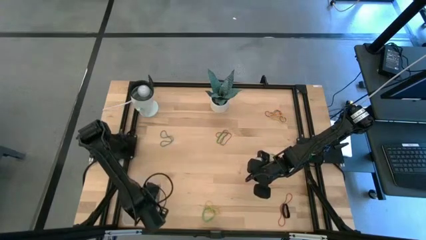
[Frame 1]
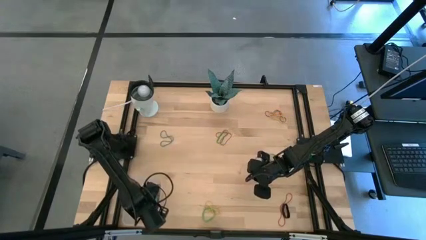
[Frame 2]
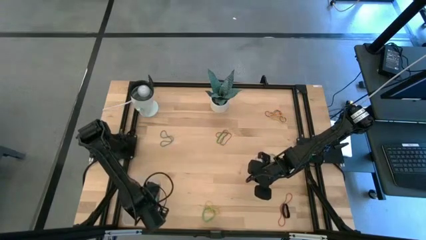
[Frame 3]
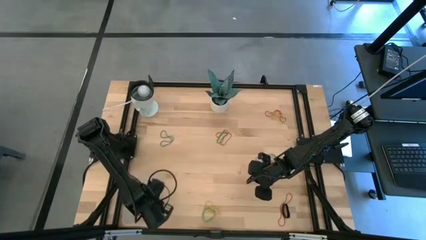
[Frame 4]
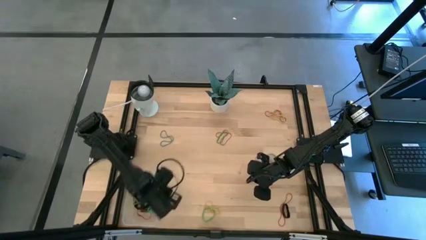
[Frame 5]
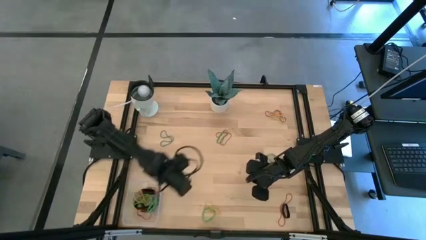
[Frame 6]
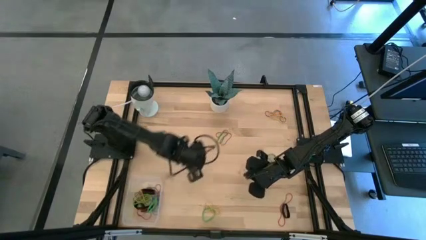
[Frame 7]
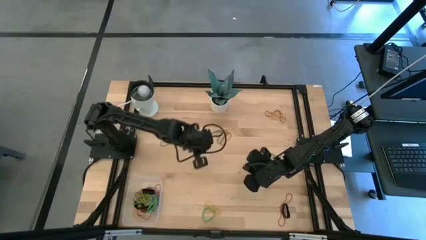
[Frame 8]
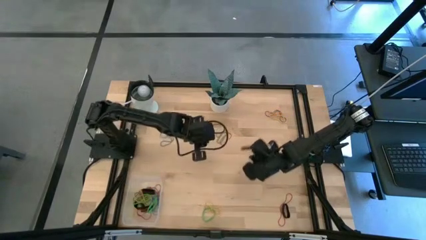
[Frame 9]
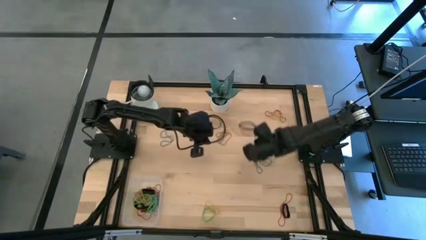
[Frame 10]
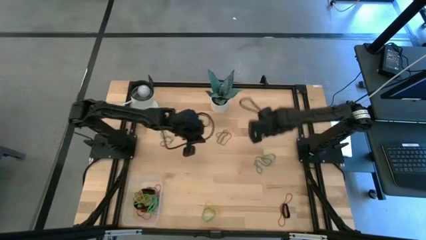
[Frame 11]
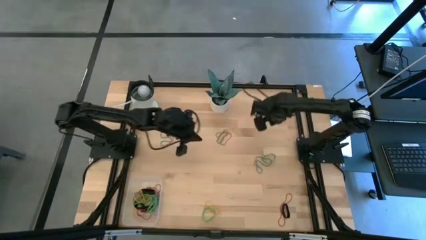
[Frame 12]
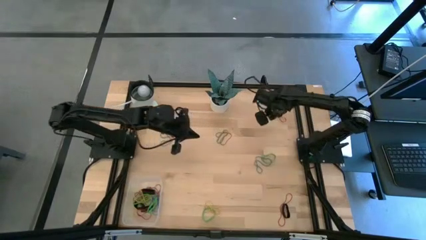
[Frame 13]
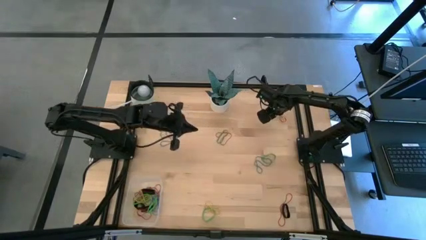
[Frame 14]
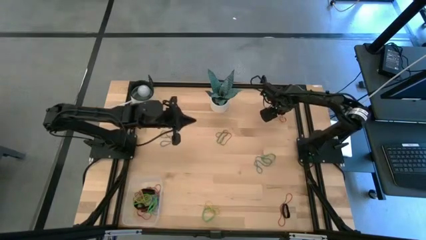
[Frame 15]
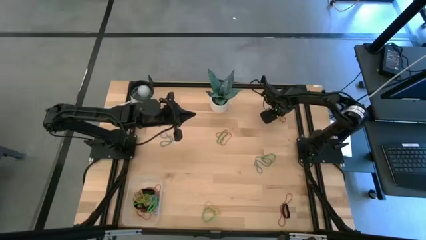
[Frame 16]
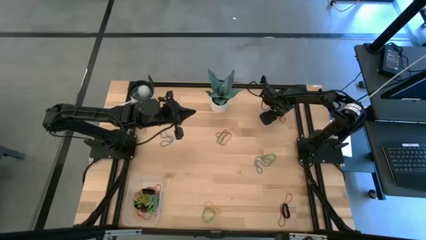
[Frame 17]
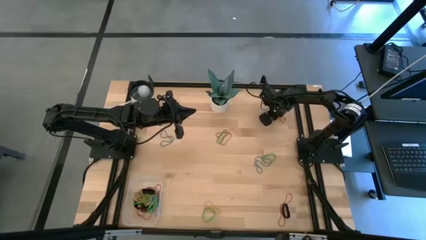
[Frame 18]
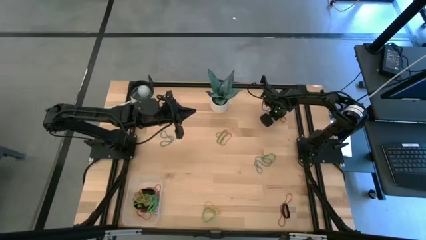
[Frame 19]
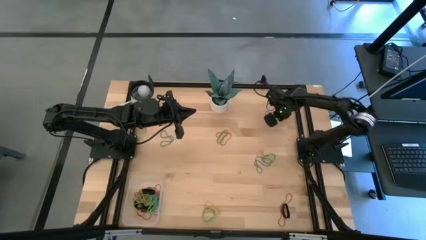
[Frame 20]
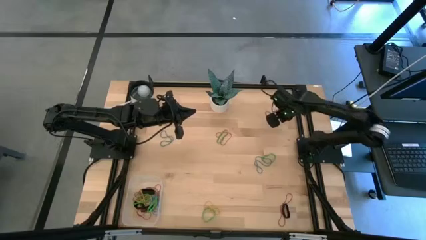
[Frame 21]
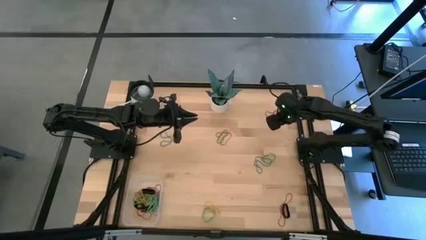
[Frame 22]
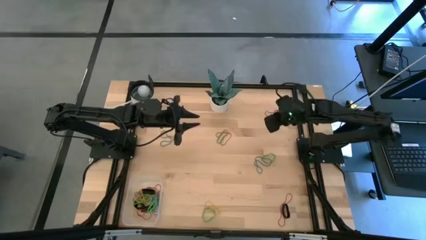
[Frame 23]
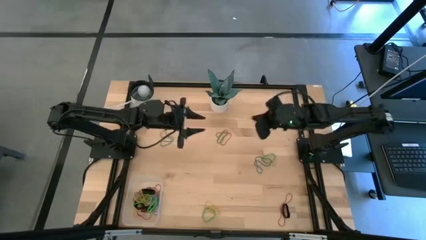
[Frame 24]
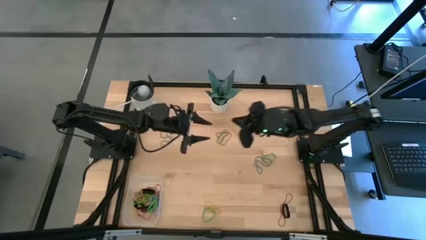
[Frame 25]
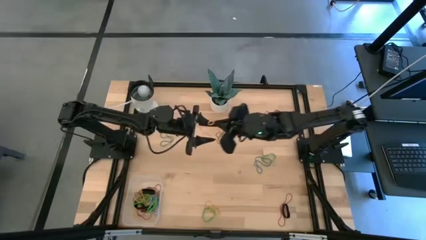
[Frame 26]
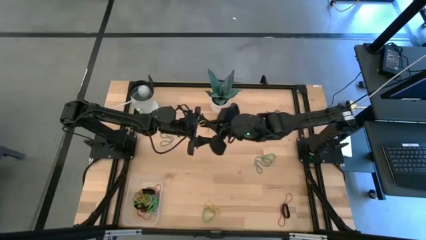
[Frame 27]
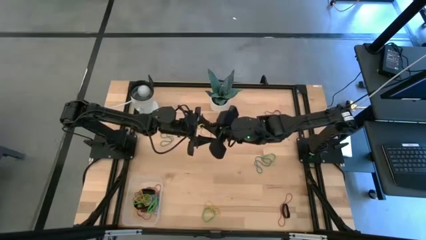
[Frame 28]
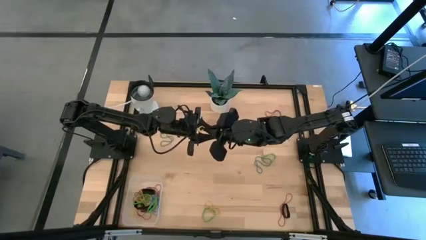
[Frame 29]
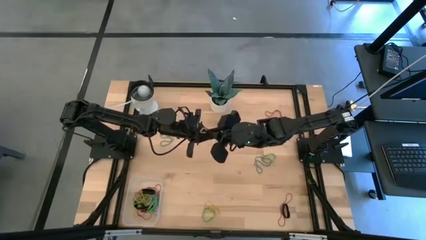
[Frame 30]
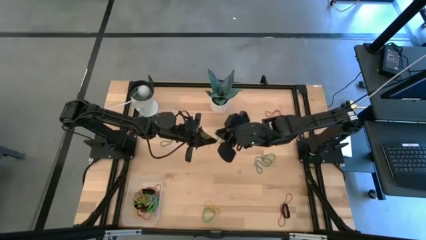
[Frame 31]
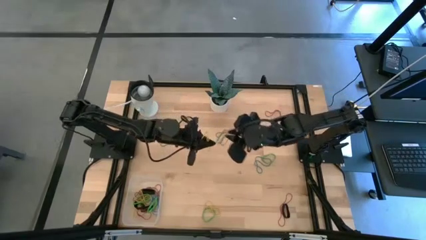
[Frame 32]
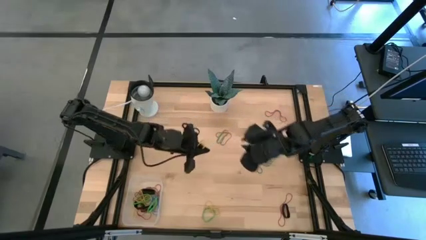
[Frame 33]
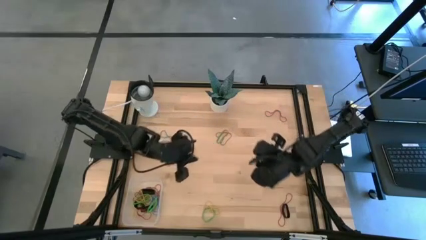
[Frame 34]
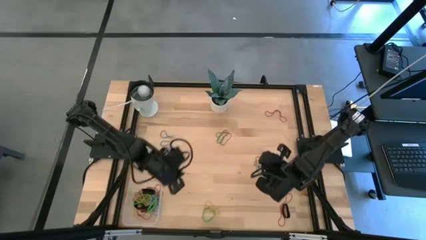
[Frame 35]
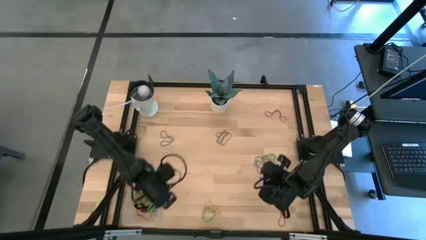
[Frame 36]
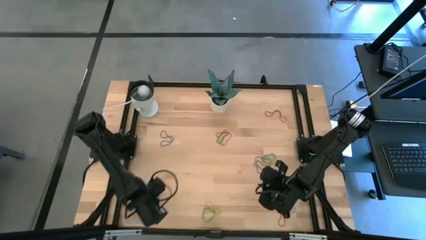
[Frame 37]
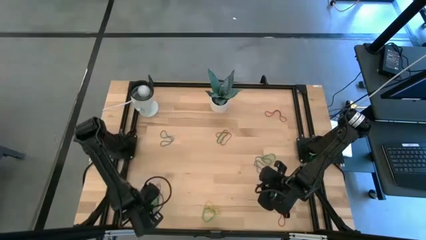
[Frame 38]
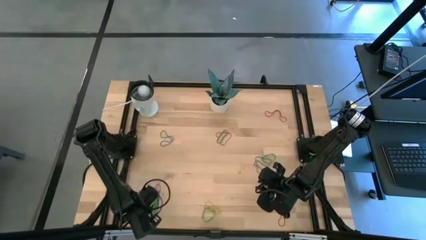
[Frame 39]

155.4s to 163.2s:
Task: Pick and place rubber bands into bin
Put the yellow rubber band into the transparent bin

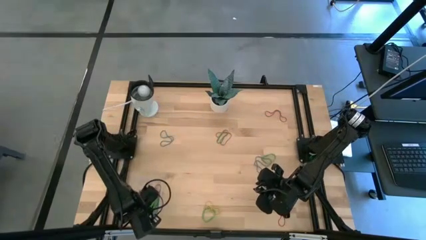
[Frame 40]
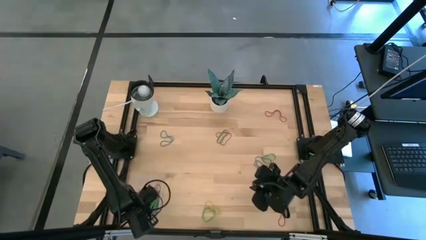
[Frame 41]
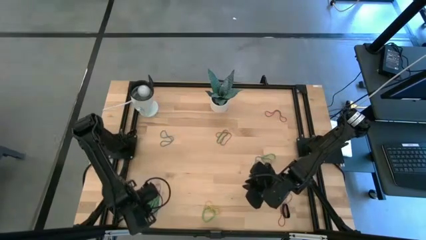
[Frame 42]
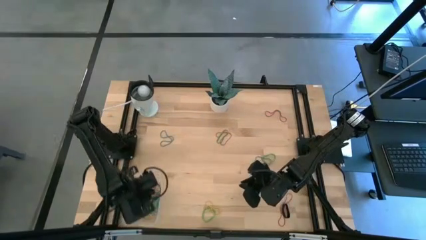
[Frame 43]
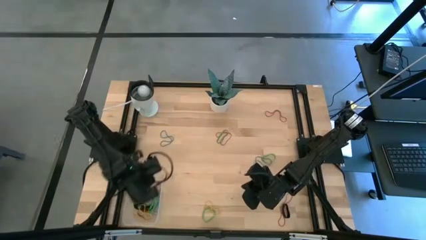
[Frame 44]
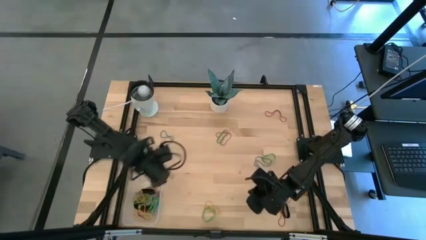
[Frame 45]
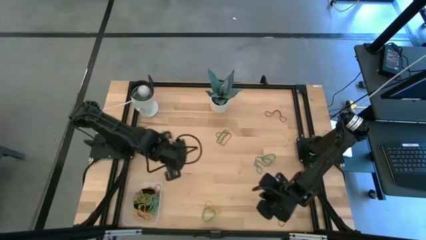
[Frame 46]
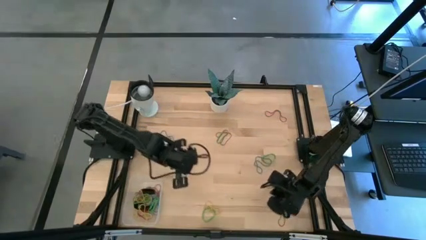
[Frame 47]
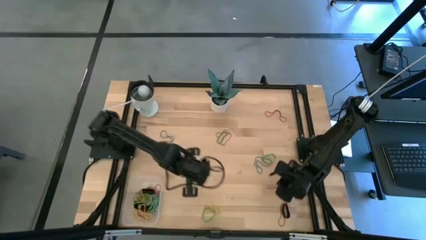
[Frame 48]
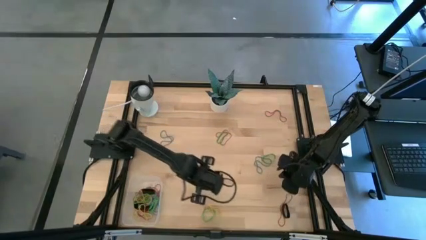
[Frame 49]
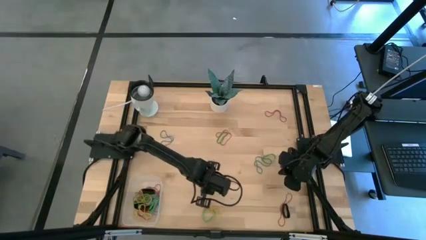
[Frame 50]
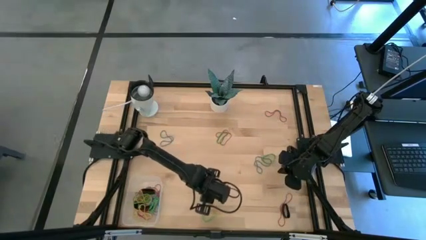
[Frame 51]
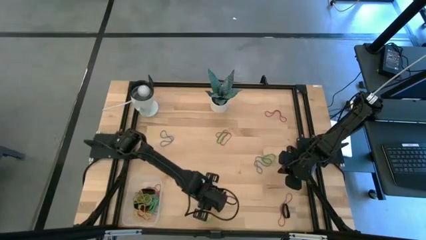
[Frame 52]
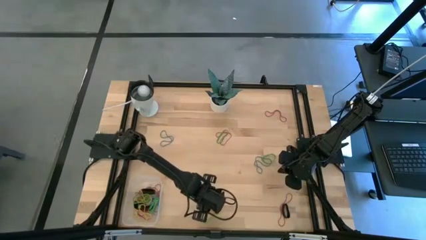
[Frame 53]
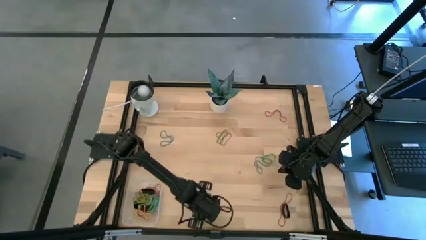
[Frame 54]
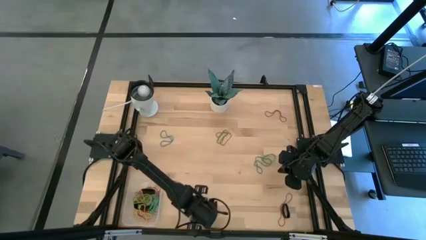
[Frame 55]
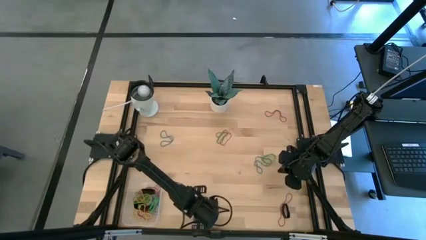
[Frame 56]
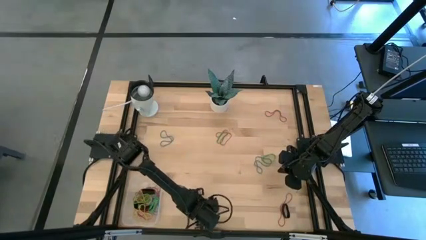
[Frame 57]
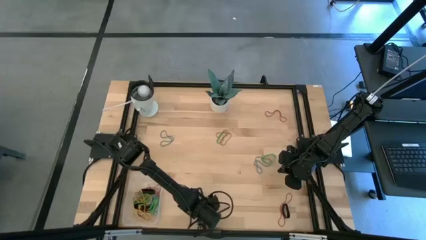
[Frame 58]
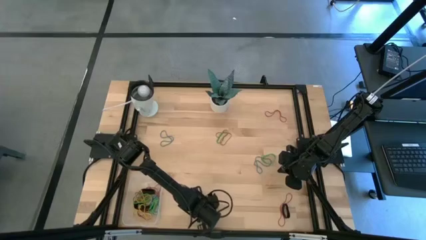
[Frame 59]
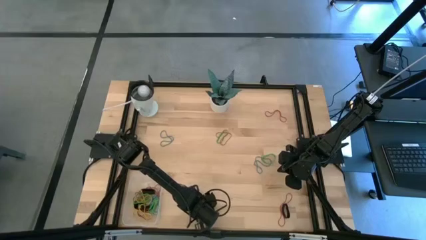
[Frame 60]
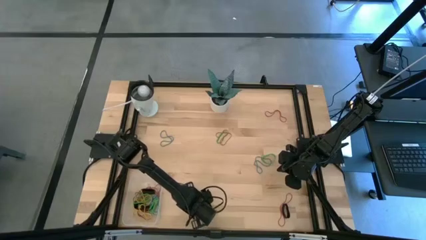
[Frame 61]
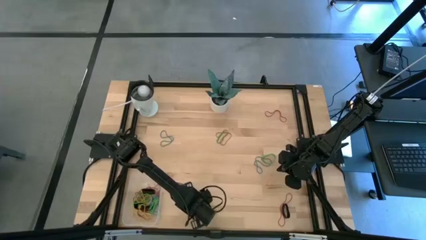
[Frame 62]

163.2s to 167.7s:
Put the green rubber band into the transparent bin

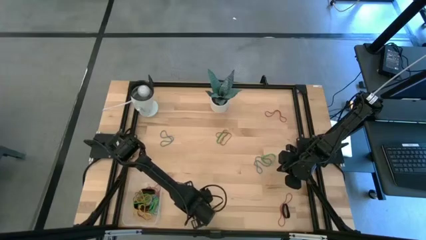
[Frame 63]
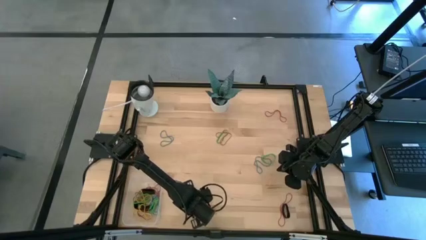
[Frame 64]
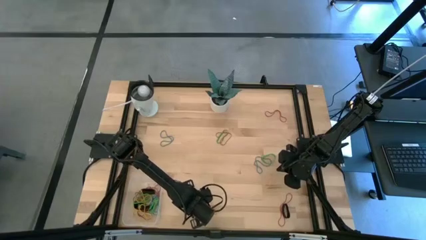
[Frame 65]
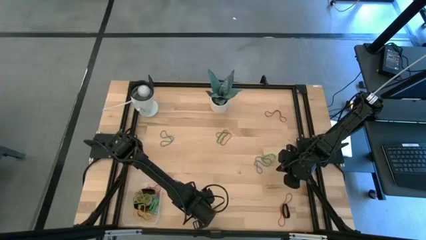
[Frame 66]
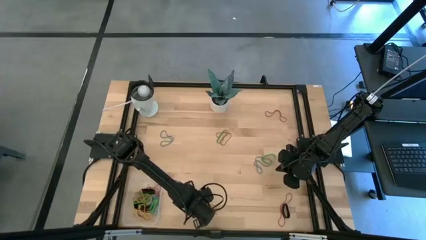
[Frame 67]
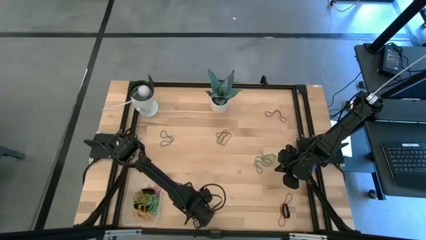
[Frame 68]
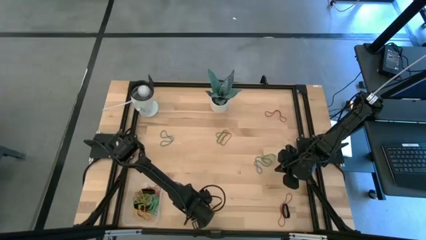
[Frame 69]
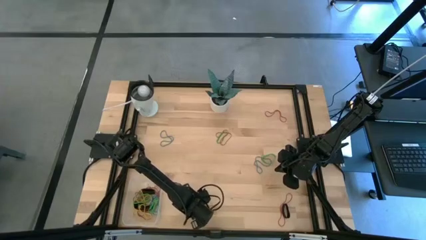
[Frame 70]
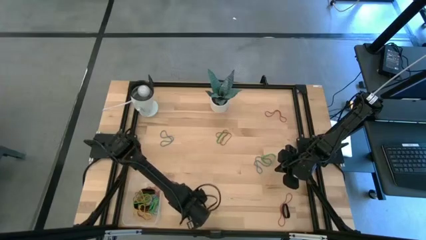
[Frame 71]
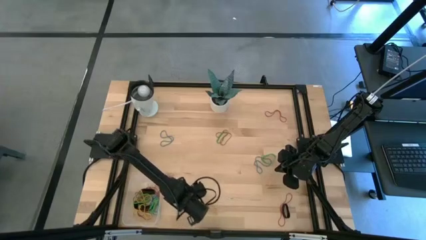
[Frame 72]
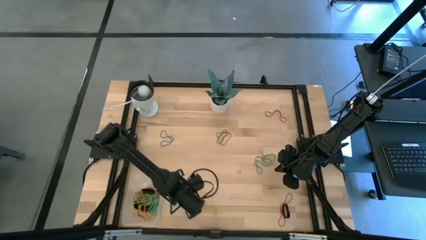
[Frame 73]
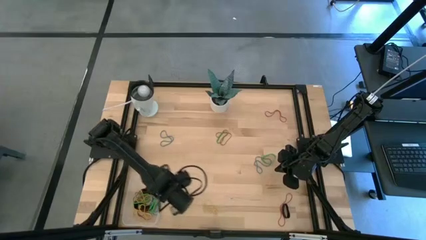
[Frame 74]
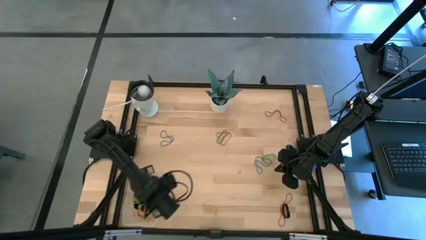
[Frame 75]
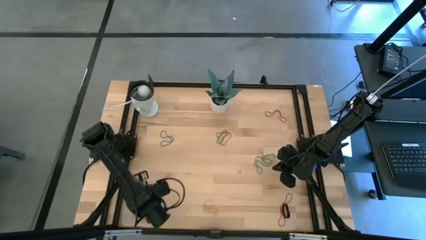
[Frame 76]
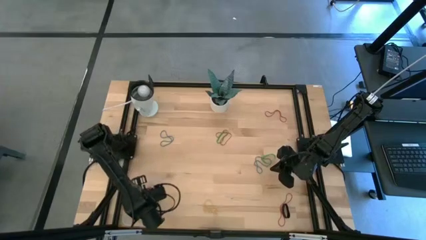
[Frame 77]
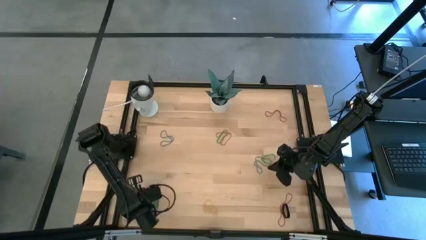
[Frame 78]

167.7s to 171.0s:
Put the green rubber band into the transparent bin

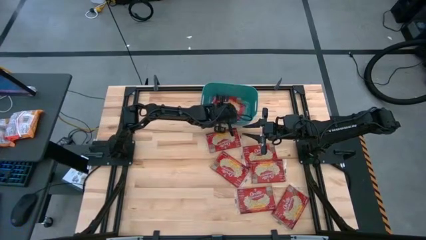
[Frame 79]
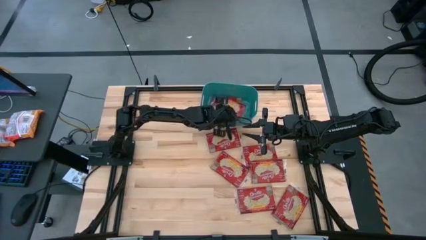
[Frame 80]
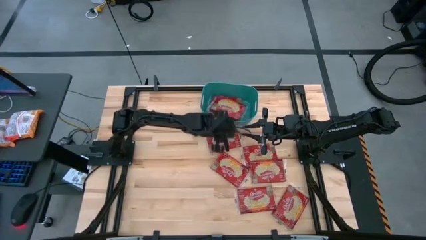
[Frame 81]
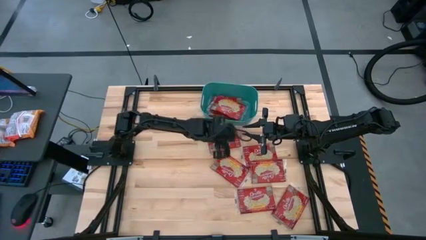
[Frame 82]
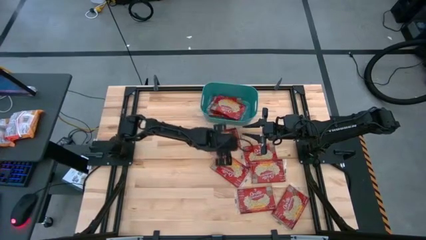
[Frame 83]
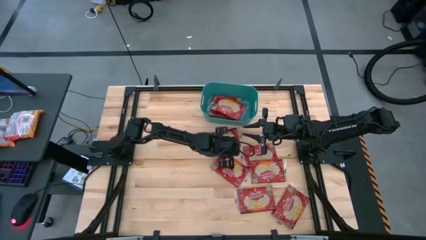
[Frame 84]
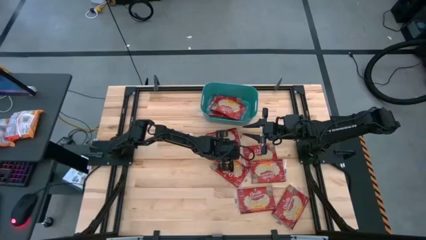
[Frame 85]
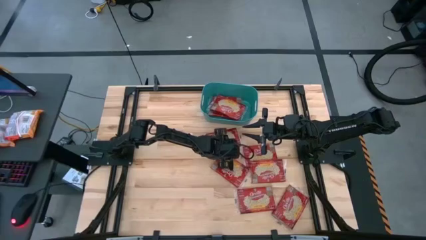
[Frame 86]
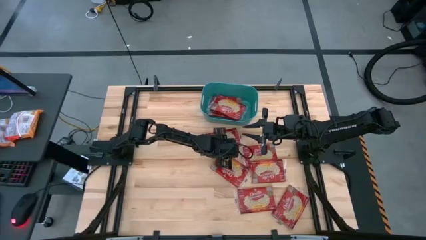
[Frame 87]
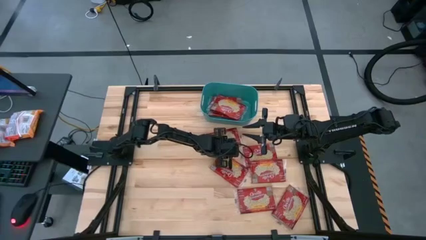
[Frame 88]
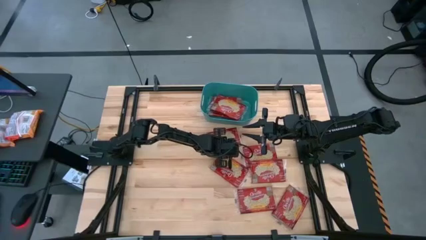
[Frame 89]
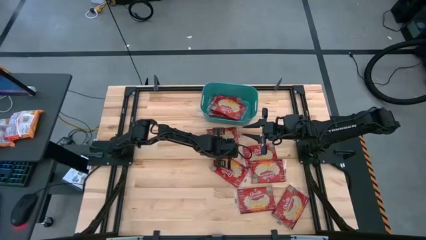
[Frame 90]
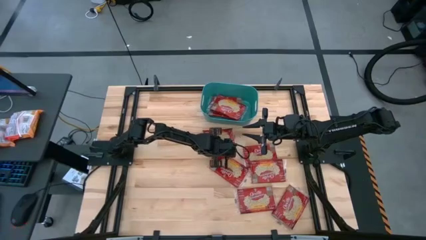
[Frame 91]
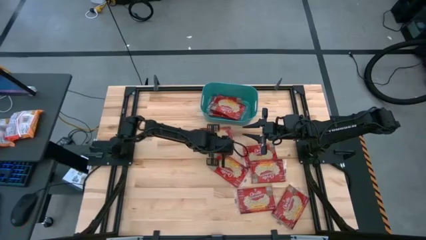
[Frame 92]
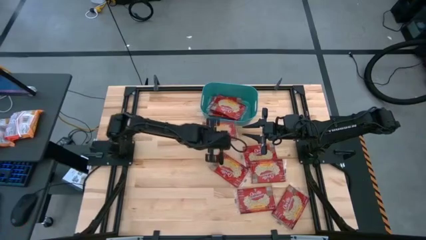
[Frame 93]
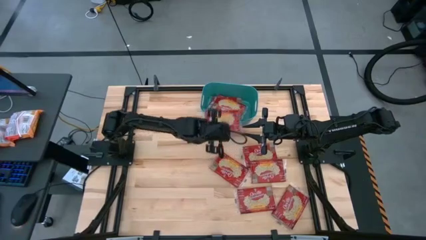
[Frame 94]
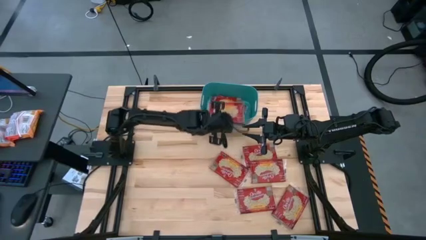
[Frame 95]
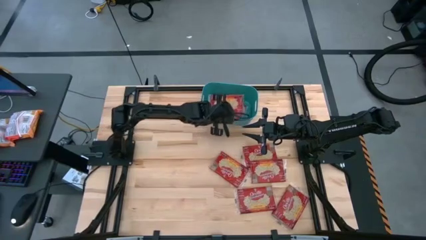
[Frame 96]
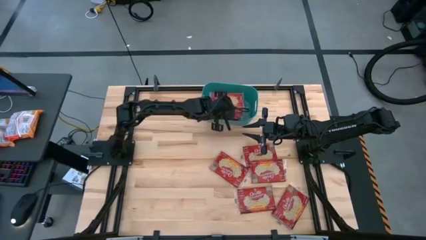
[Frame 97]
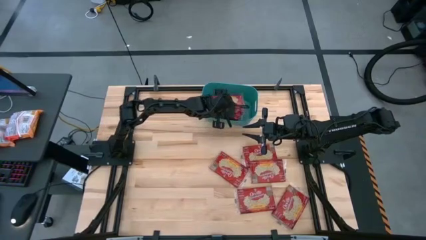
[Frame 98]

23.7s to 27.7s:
Task: Sort popcorn bags into baskets
Put the red popcorn bag into the blue bin
